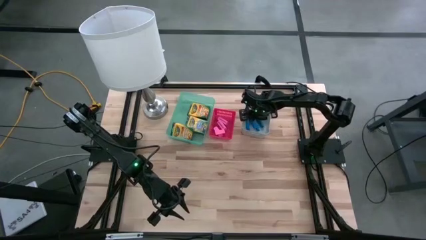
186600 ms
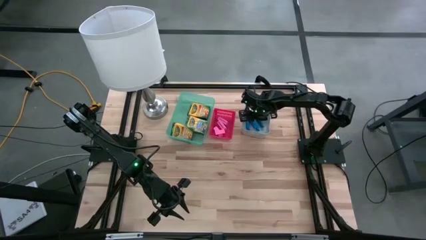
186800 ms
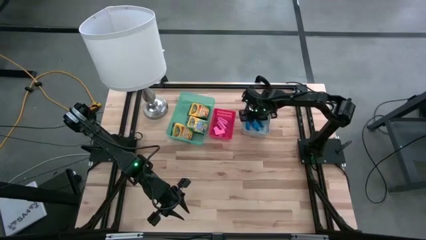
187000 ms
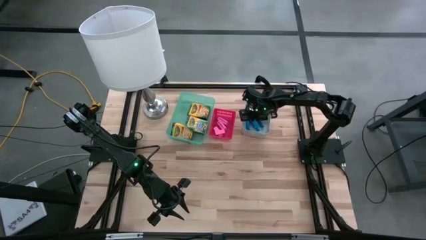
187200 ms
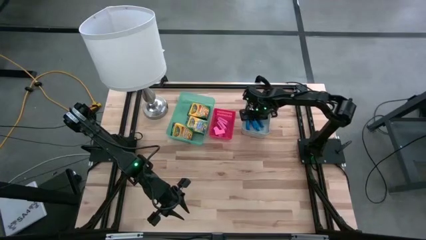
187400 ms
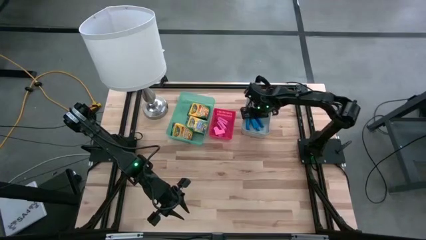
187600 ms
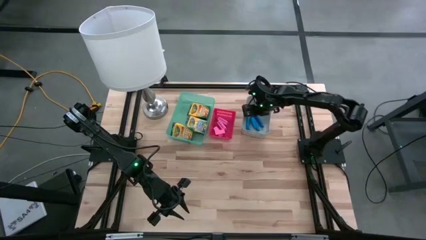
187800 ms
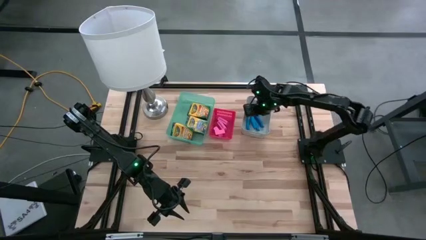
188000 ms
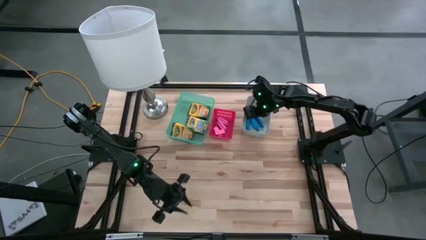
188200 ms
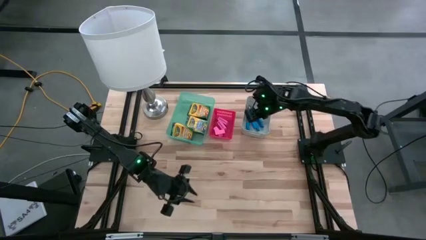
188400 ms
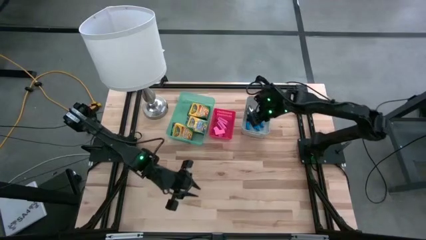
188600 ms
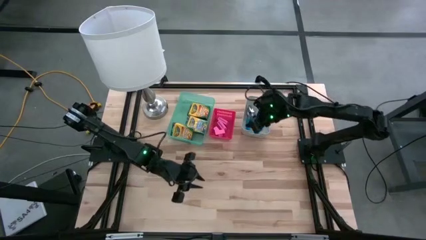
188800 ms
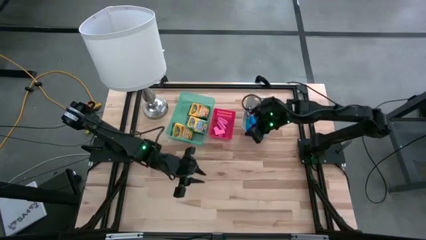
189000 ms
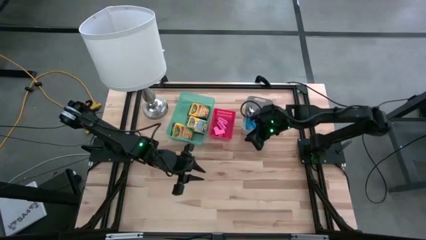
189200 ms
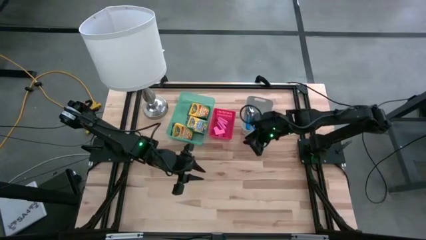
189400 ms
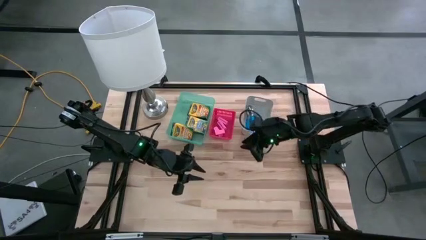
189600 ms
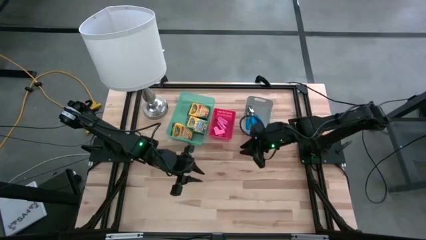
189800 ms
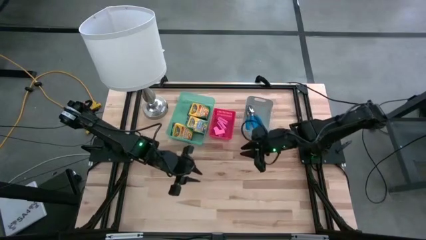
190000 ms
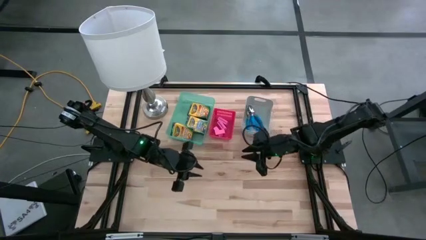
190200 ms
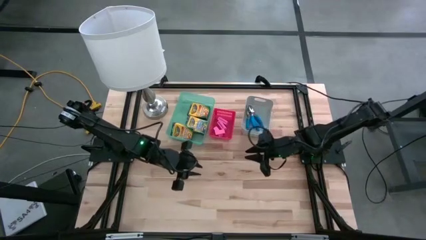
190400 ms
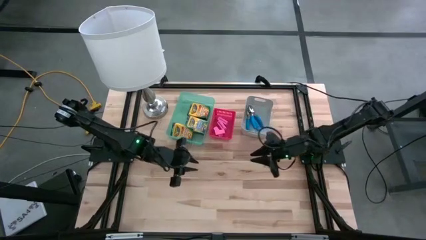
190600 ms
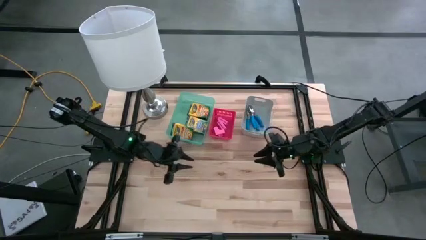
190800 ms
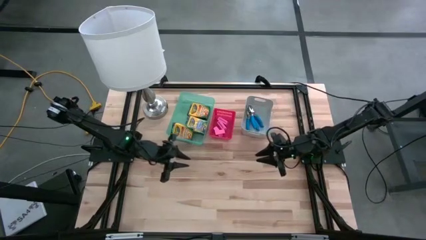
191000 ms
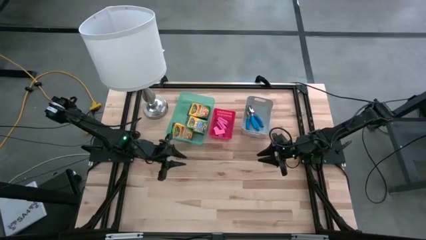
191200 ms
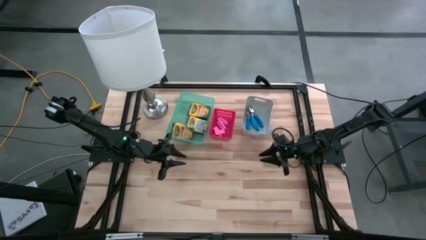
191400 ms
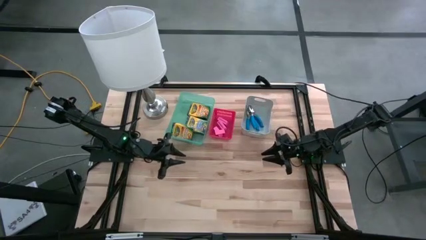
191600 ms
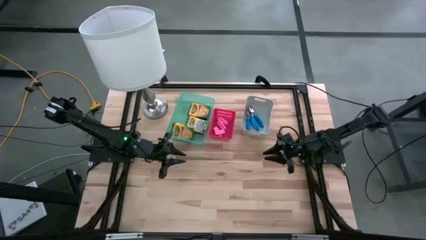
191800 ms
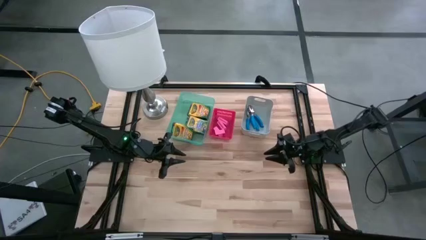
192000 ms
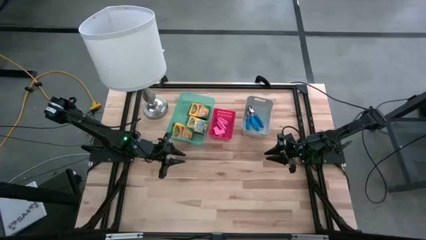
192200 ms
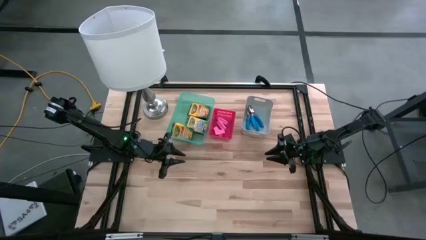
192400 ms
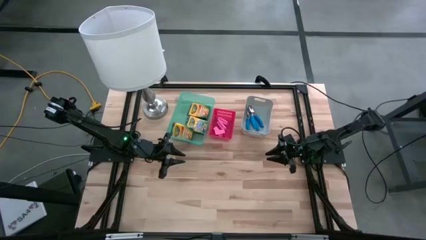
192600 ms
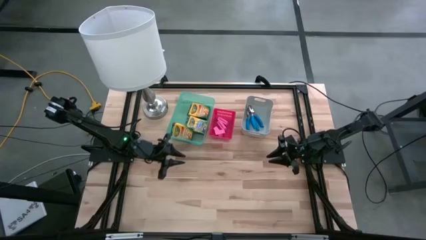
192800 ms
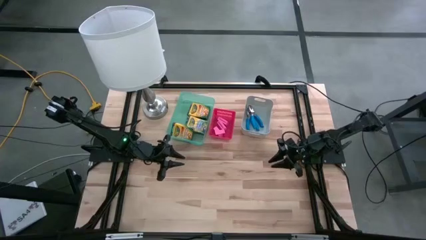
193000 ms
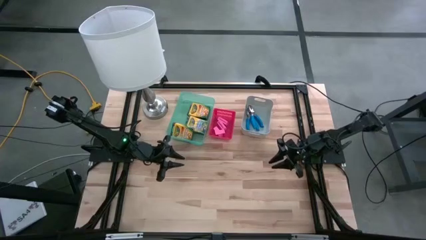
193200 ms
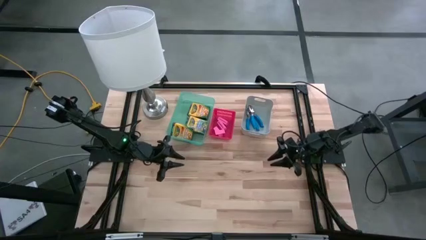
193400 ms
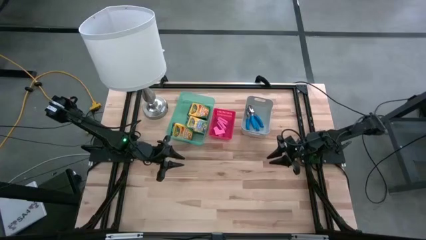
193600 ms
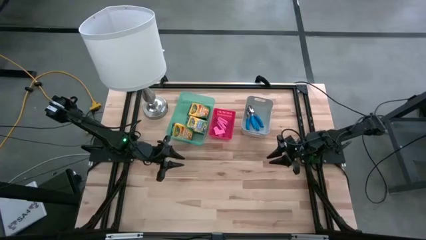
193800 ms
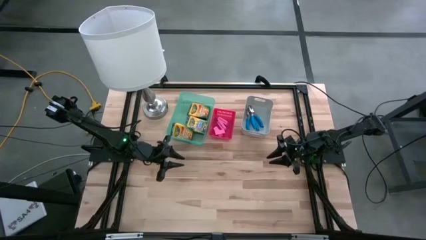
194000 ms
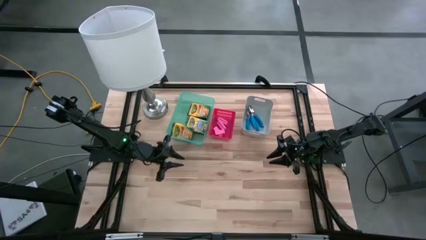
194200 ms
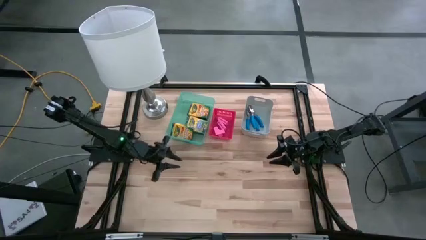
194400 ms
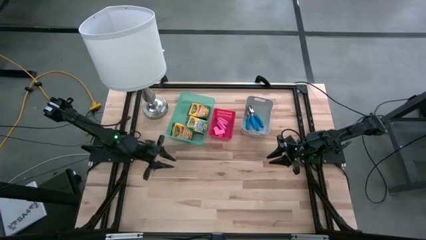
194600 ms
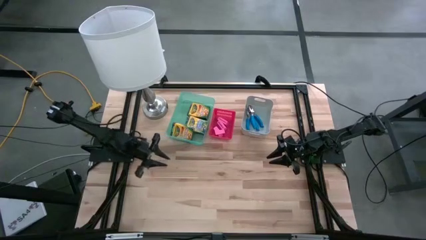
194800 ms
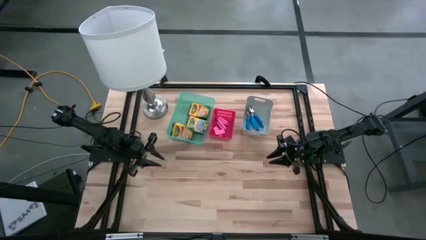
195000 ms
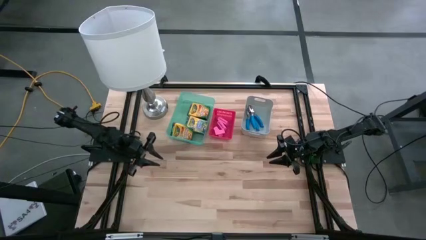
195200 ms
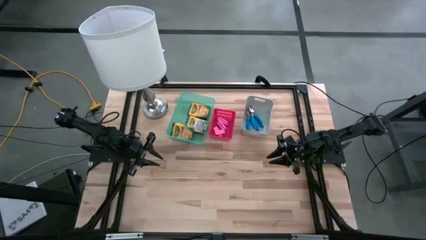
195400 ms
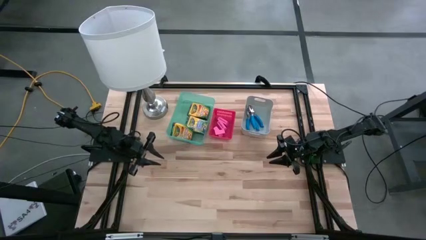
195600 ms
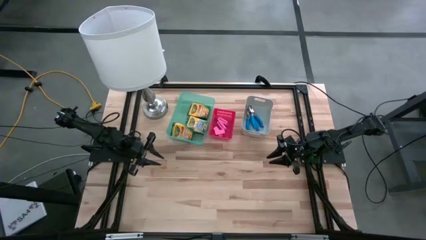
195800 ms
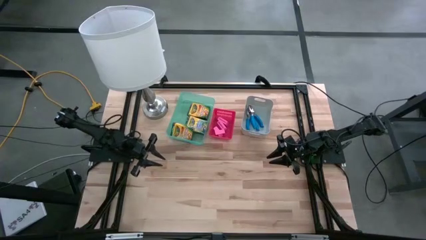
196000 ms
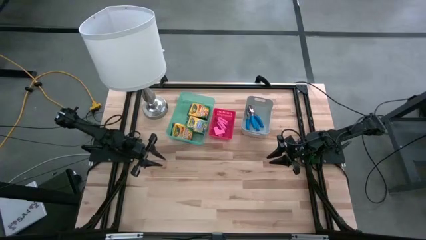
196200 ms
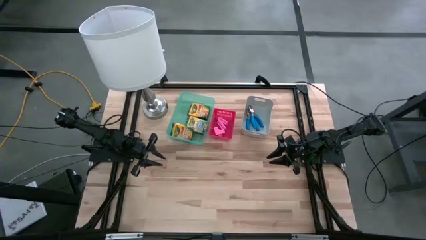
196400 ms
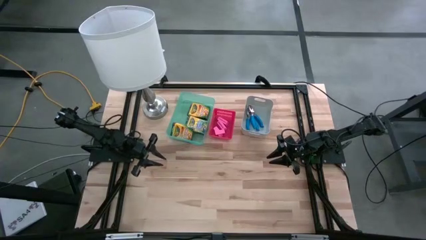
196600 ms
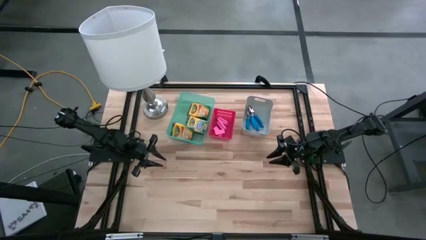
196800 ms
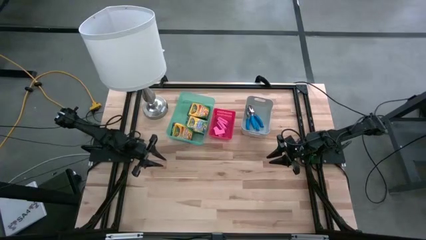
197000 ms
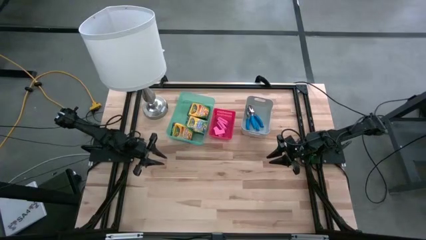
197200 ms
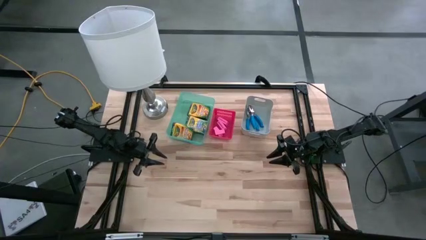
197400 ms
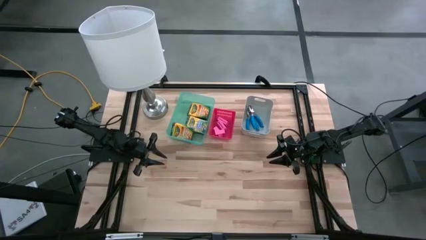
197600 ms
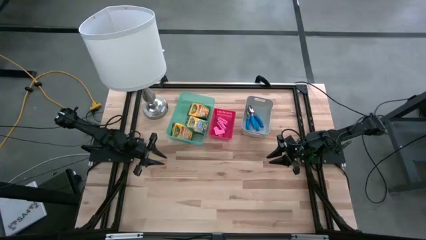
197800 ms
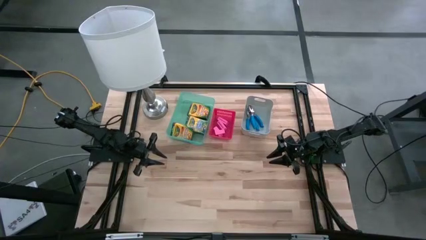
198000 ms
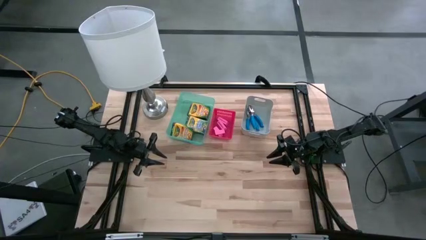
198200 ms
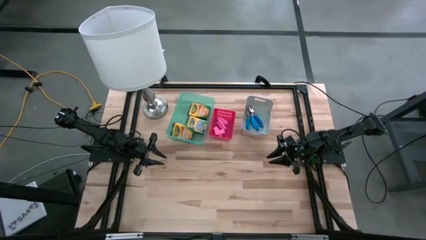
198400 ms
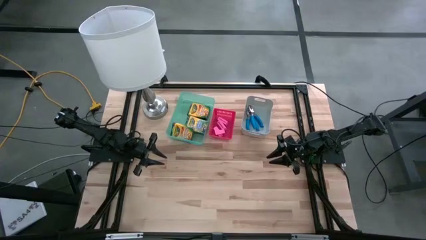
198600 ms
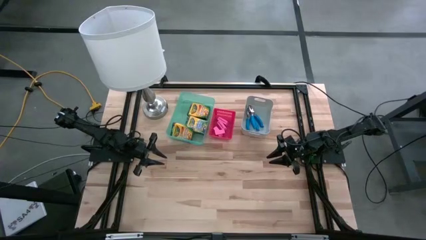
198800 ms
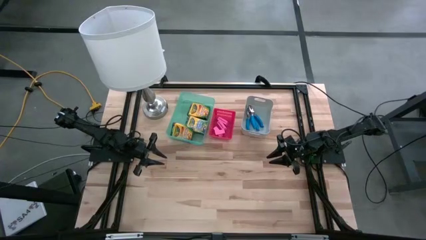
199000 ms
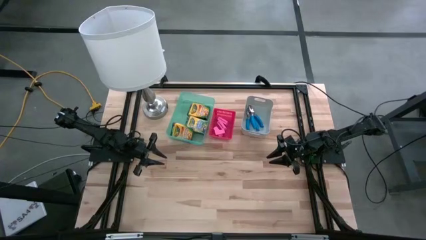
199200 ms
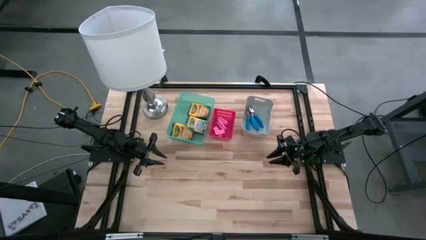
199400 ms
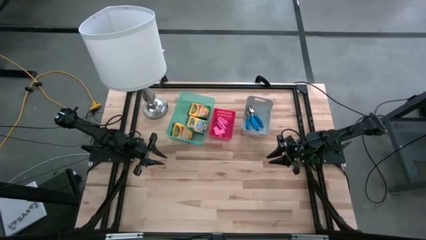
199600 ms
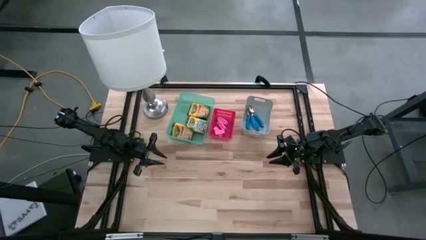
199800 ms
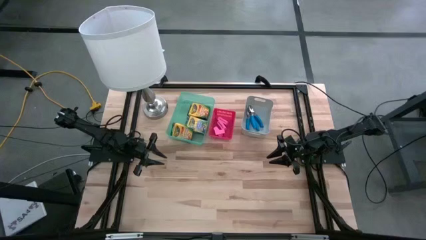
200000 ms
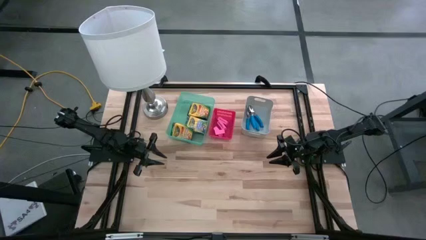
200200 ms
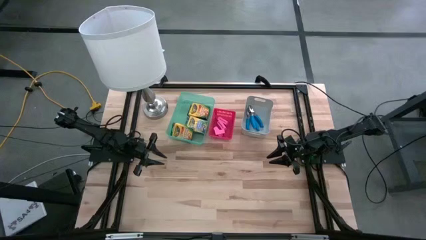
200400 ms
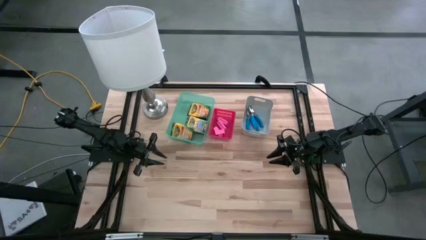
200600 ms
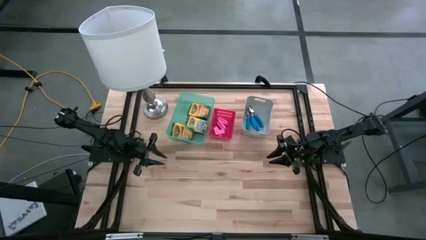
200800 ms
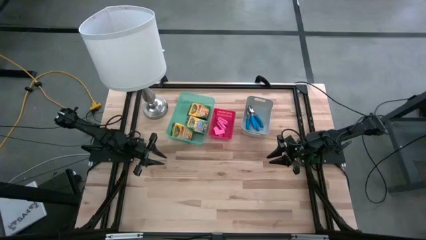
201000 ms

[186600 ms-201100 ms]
Task: Pick & Place School Supplies
Return to Home Position

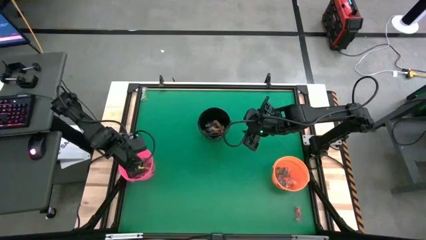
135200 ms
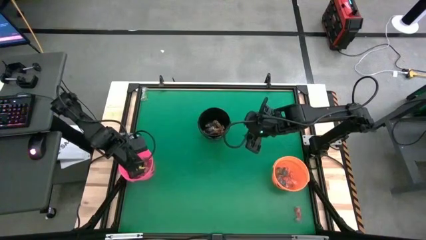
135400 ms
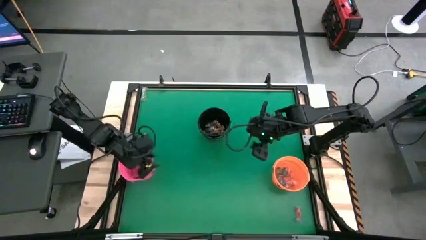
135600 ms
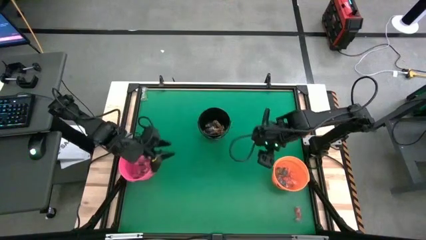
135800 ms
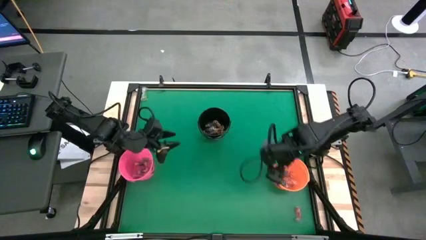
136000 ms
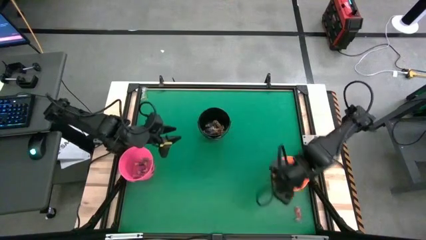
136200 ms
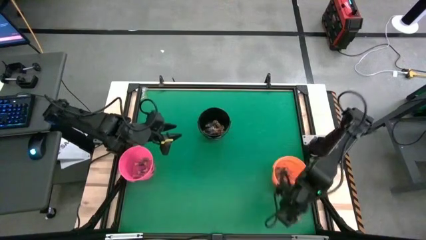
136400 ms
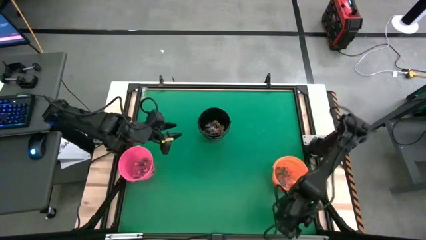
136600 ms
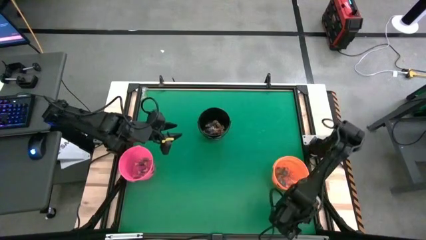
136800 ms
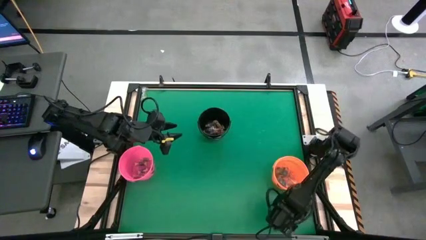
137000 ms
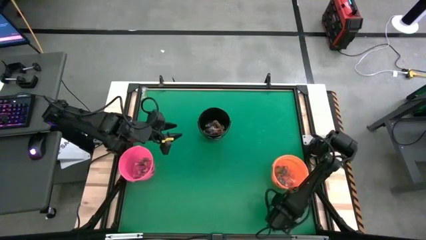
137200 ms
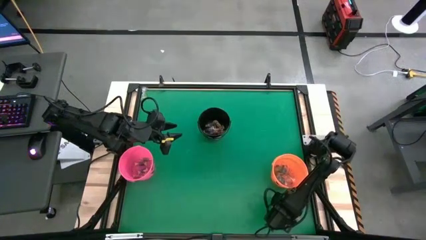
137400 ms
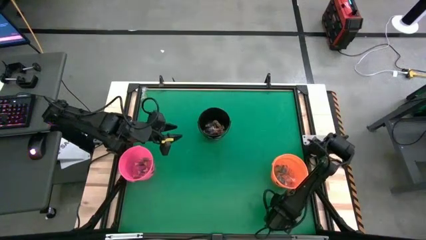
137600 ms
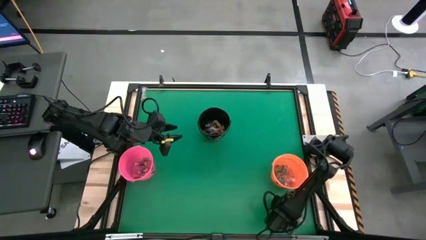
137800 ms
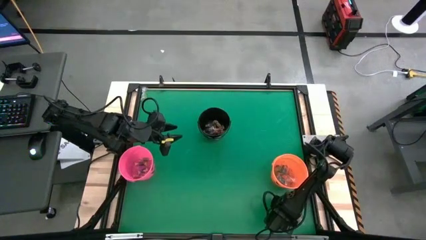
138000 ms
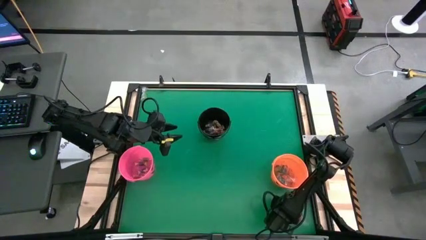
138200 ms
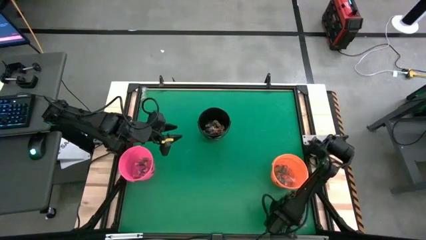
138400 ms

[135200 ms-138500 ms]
Task: Sort candy by brand, put in halloween buckets
Put the red gummy into the orange bin
